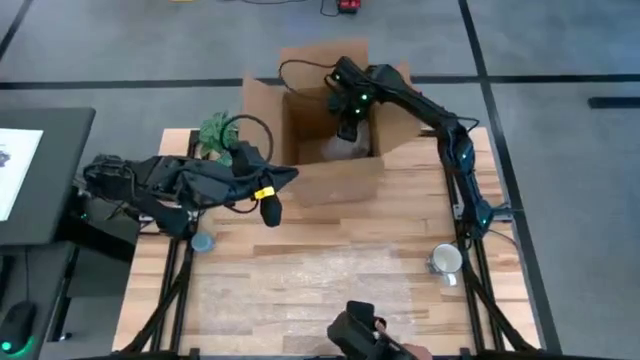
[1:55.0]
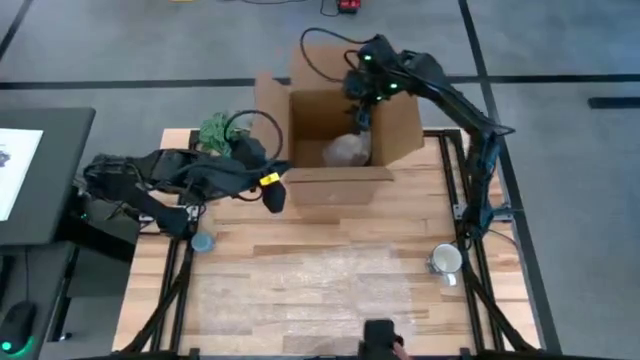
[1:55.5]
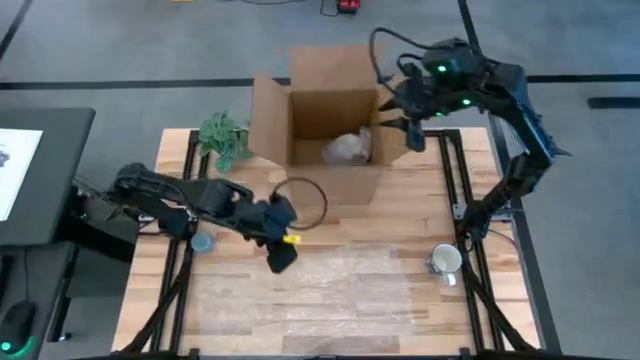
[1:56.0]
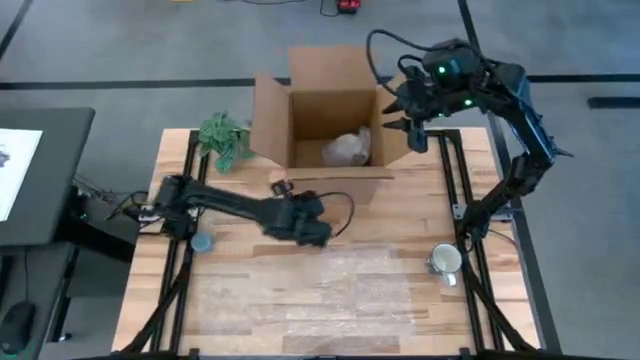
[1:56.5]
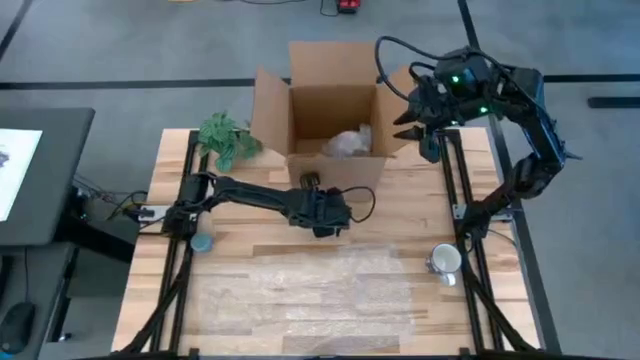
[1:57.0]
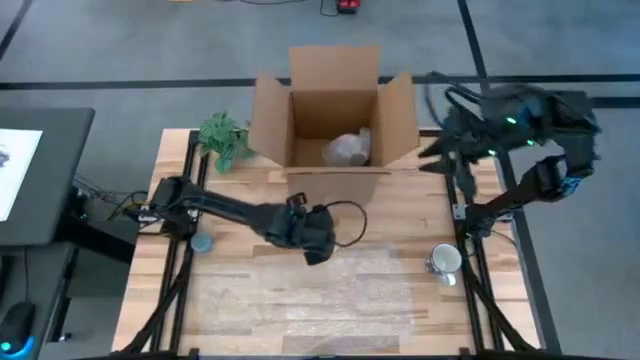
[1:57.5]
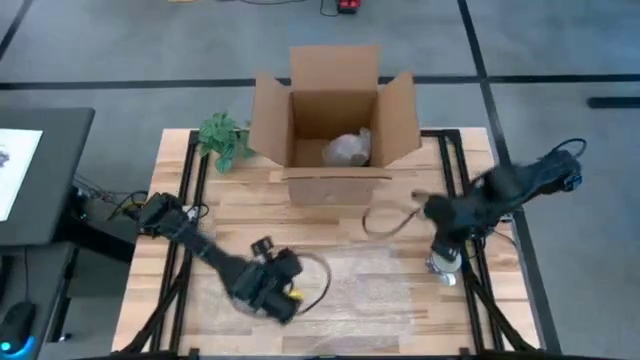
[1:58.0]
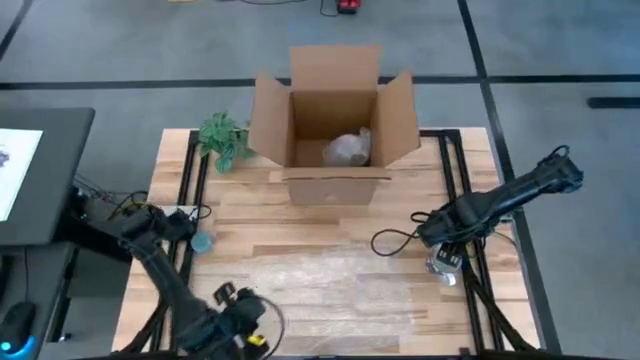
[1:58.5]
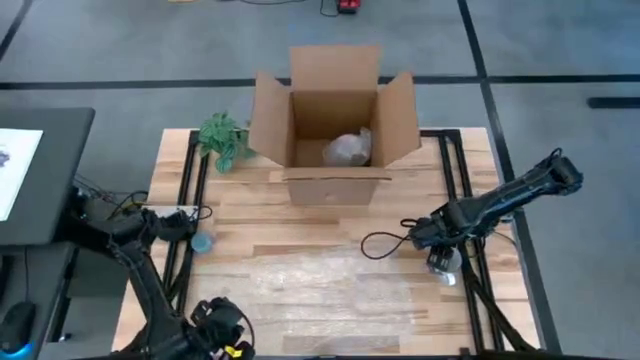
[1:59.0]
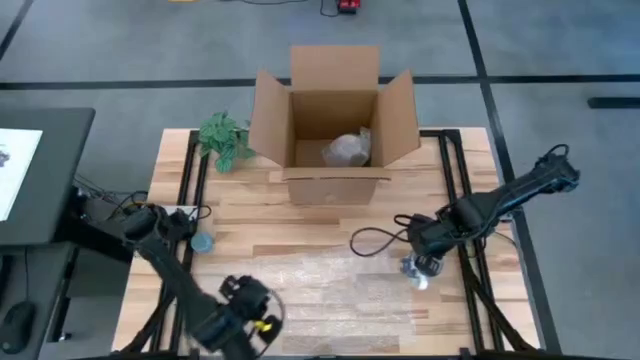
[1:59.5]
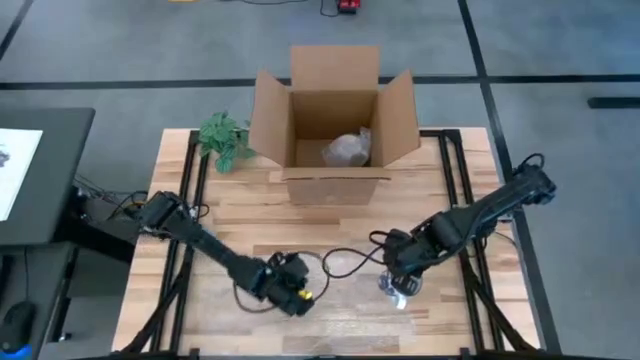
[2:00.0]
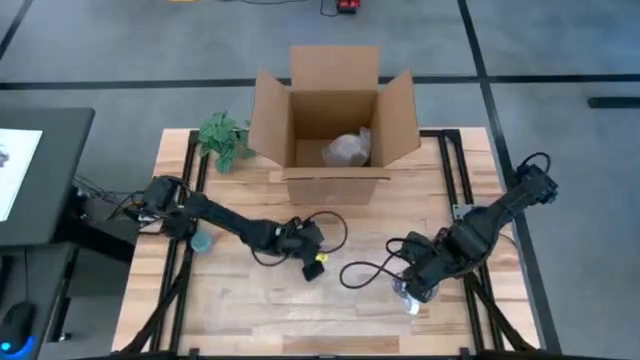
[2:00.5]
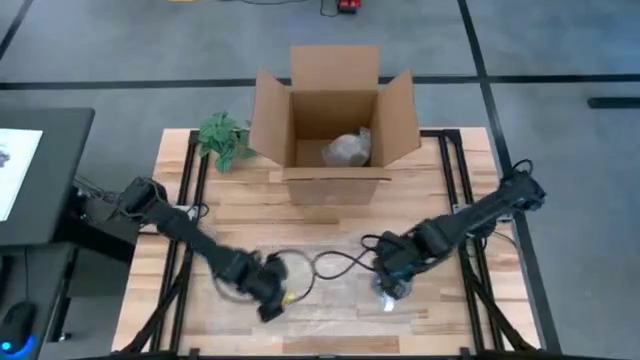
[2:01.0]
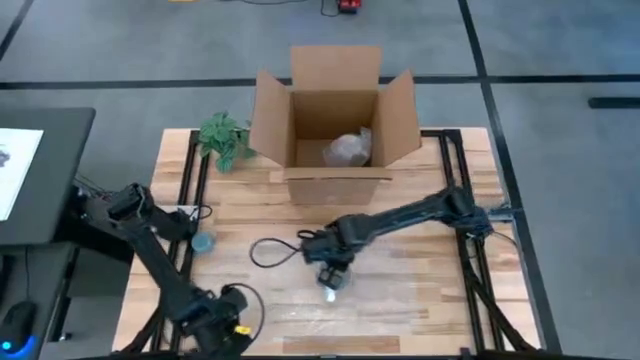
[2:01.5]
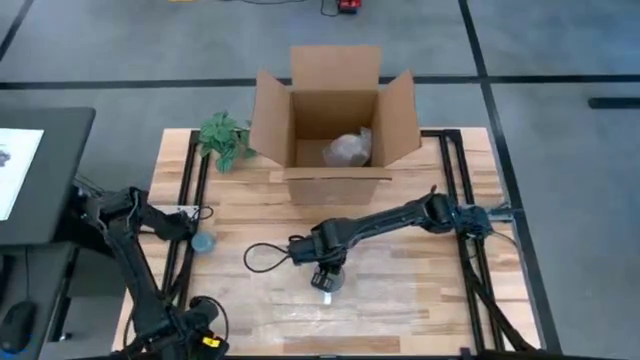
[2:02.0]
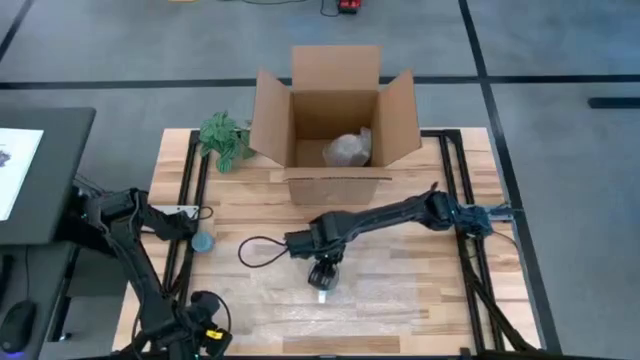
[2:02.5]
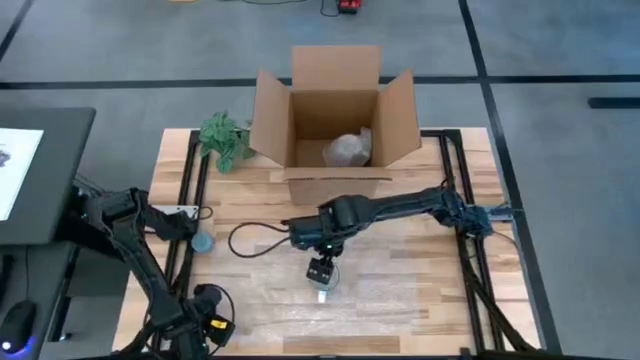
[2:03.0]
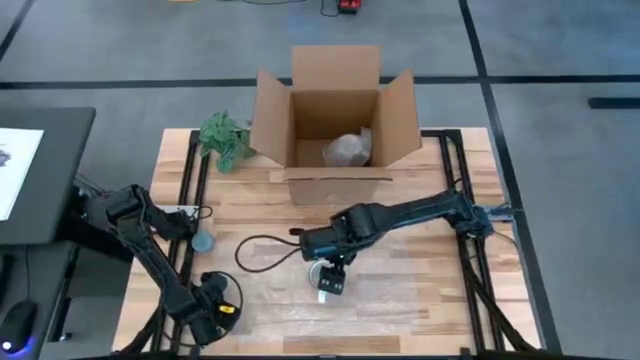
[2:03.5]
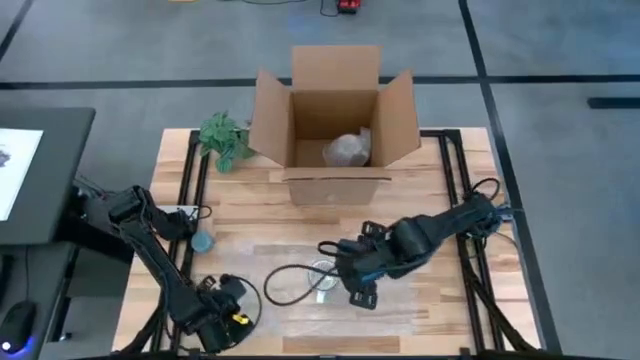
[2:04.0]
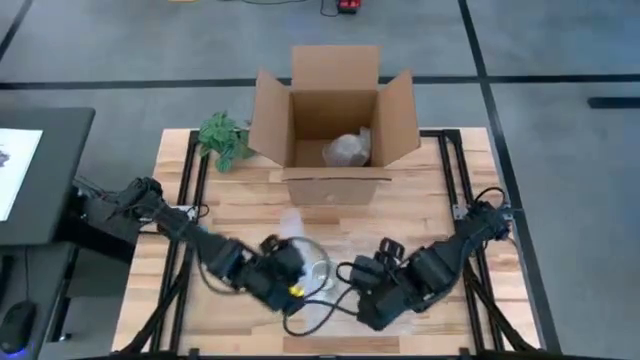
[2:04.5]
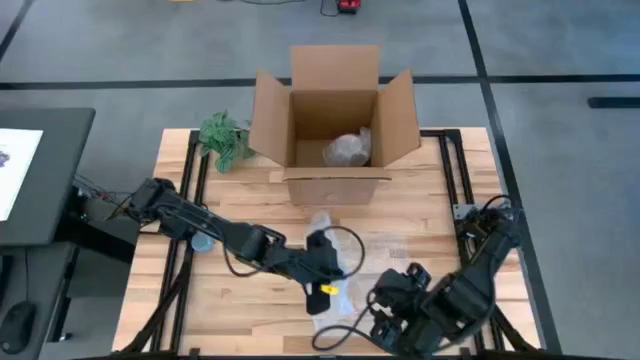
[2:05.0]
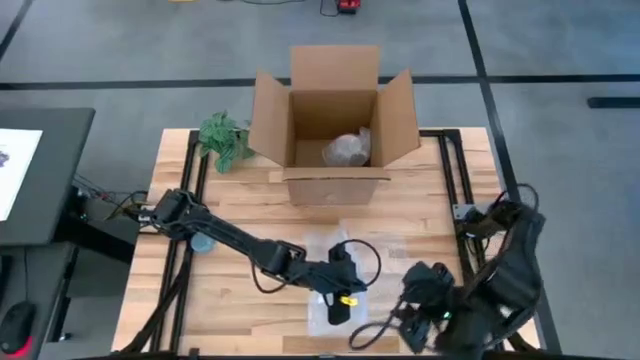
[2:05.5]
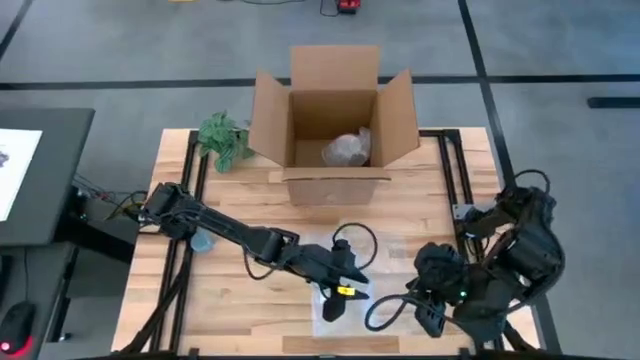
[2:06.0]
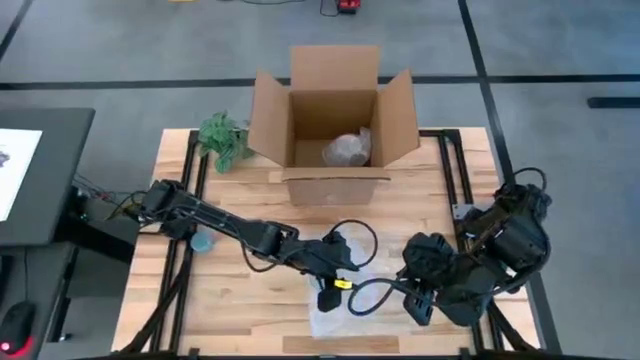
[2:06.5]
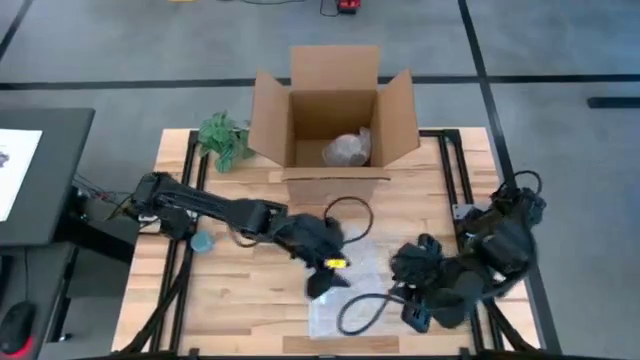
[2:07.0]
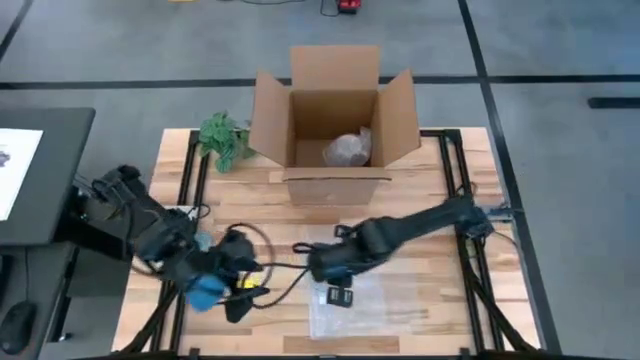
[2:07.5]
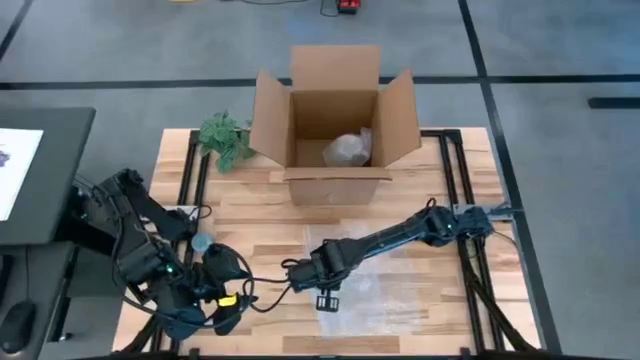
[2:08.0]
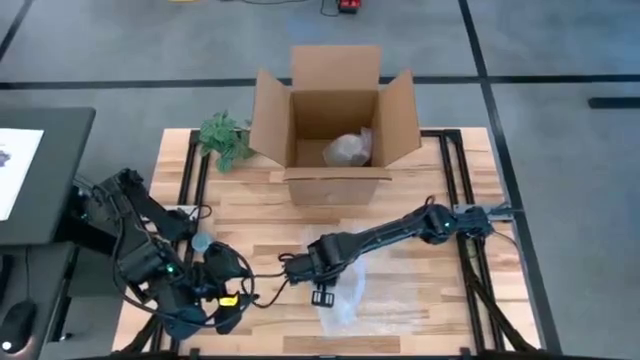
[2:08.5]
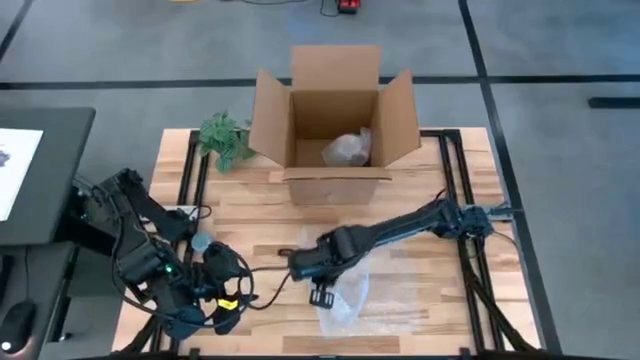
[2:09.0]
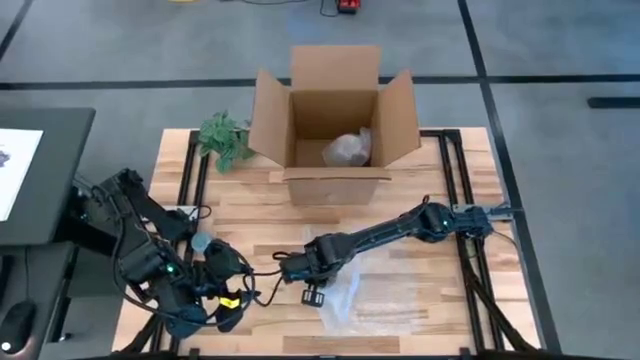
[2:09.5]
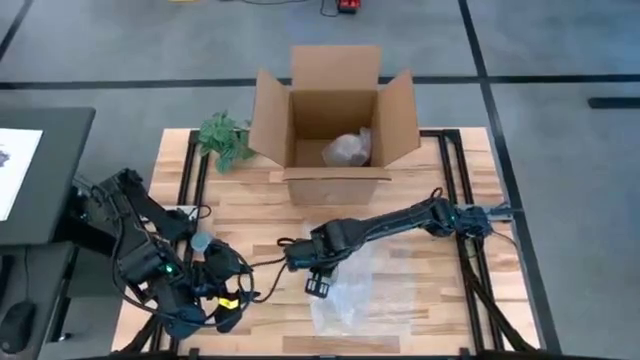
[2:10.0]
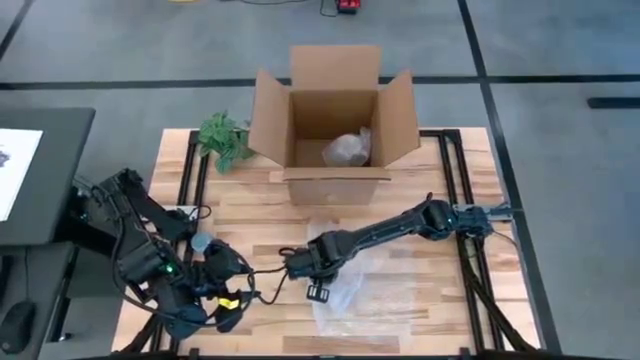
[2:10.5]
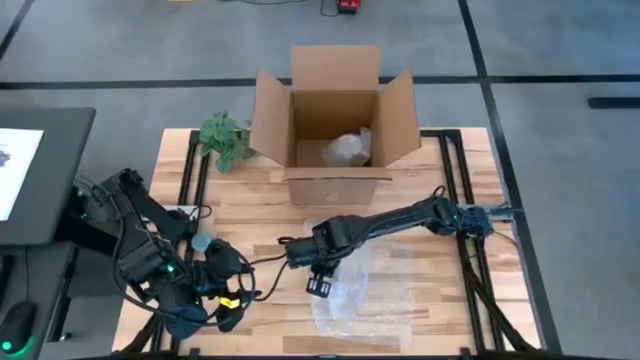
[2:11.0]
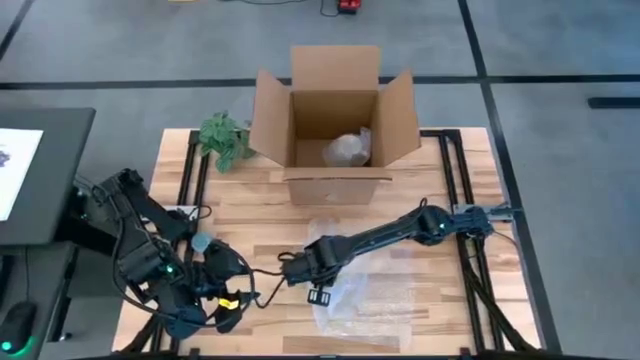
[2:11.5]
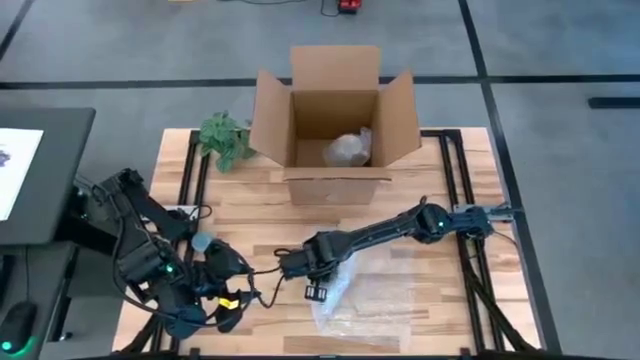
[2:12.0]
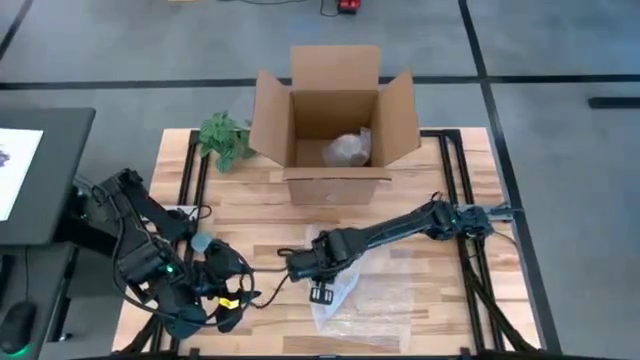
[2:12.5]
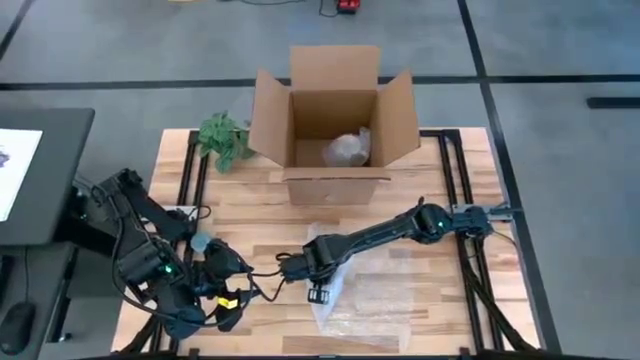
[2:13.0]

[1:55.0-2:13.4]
Task: wrap mug
Wrap the blue mug with bubble wrap

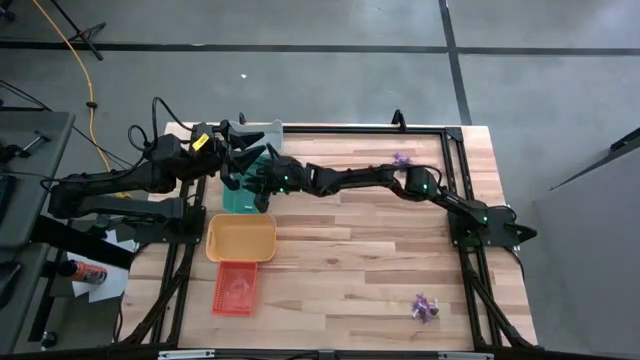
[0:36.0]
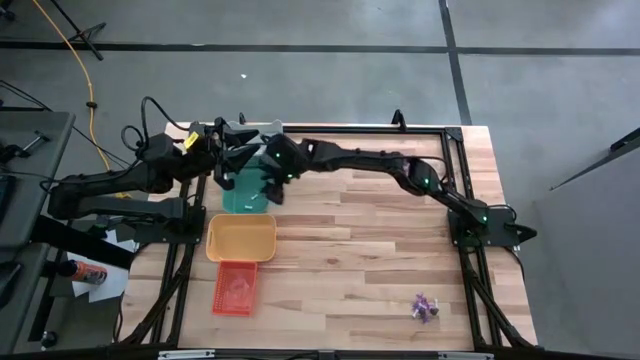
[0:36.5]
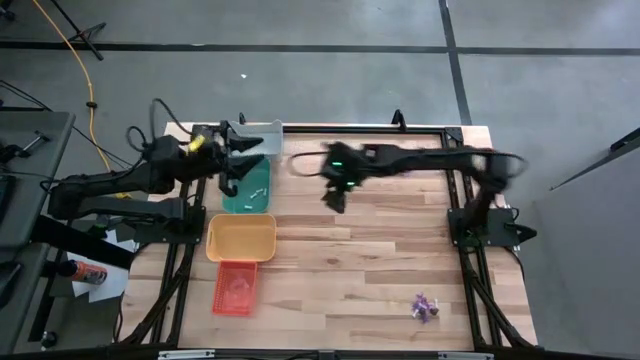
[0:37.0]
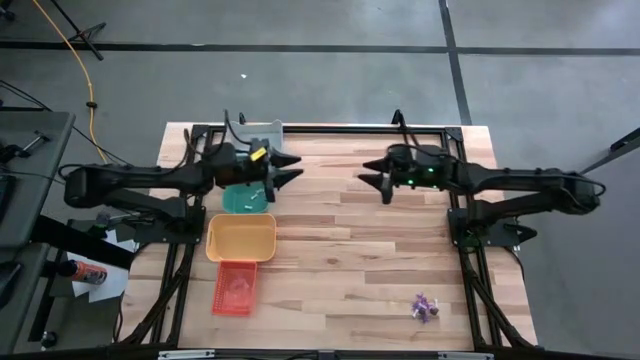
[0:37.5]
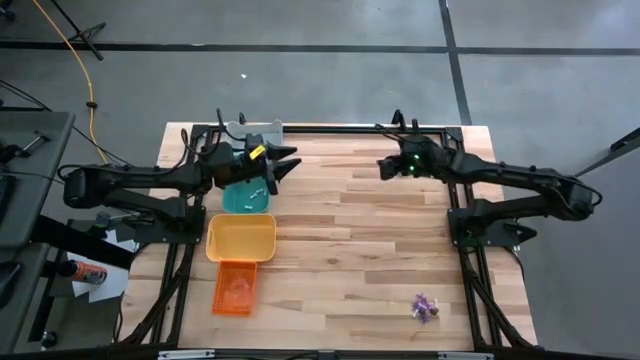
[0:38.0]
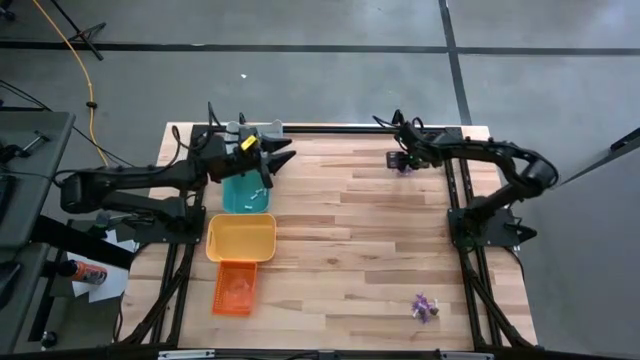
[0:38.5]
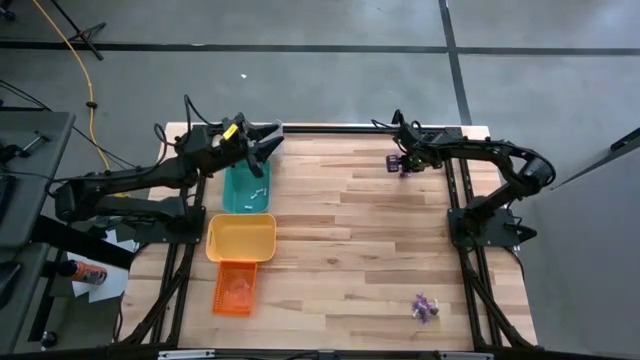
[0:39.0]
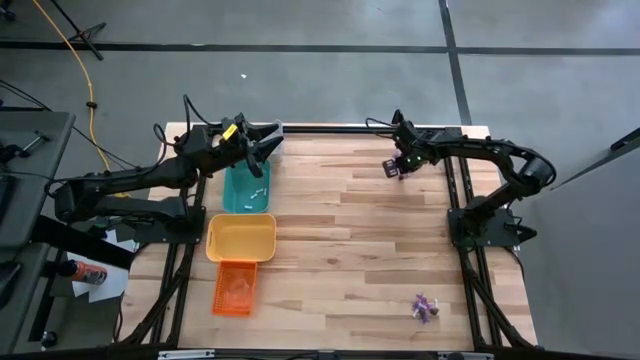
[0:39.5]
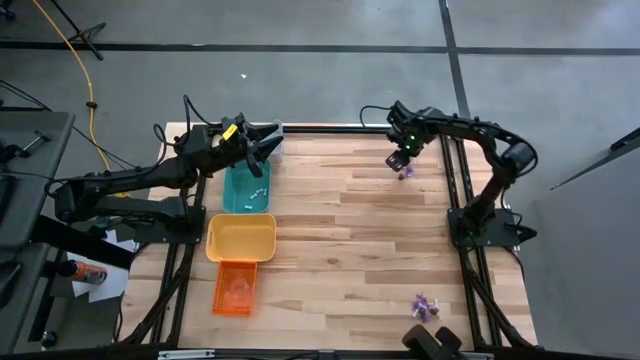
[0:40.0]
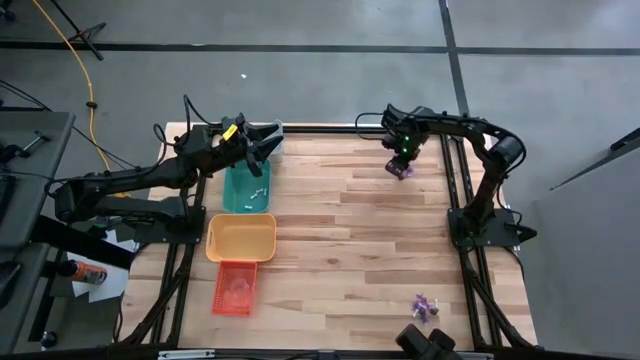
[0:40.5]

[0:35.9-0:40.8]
Task: Sort Halloween decoration
Put the white bone toy in the green bin
